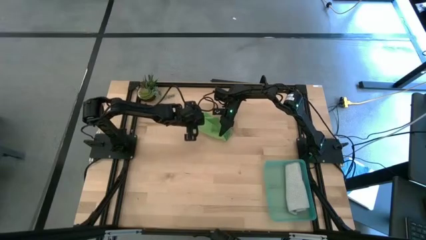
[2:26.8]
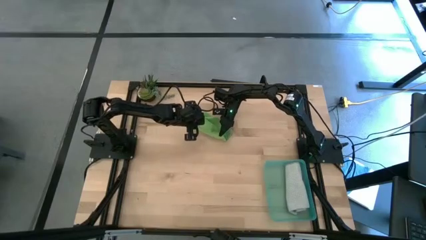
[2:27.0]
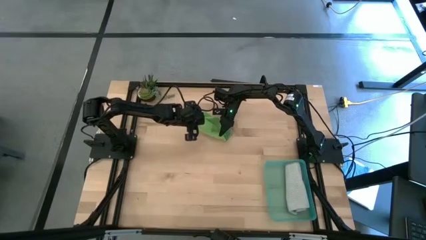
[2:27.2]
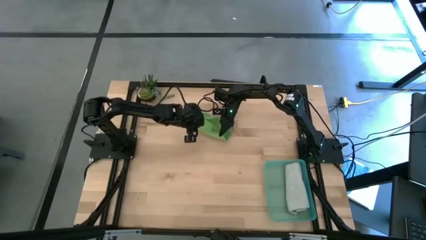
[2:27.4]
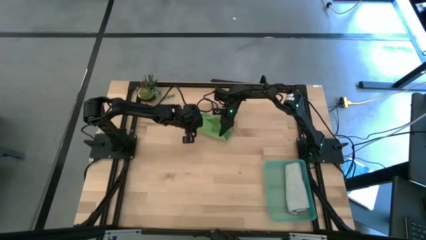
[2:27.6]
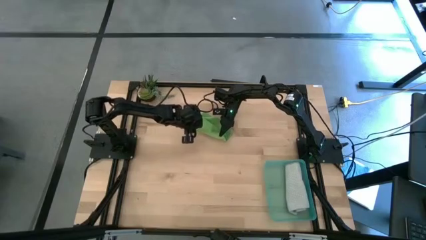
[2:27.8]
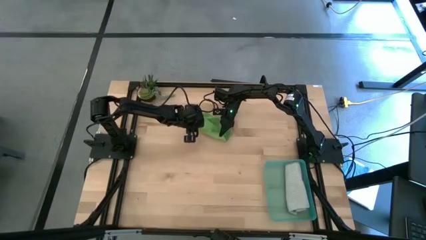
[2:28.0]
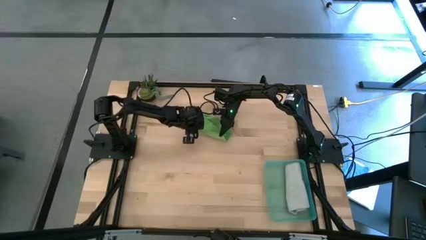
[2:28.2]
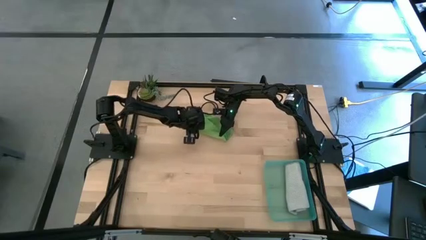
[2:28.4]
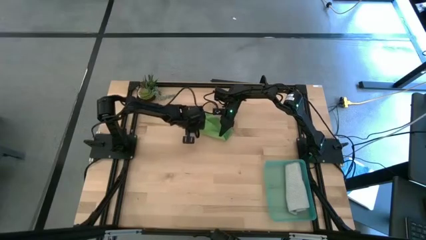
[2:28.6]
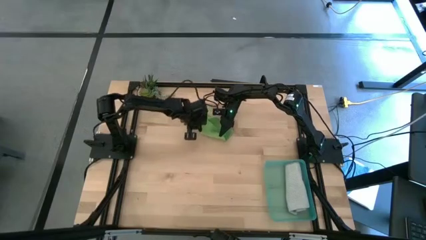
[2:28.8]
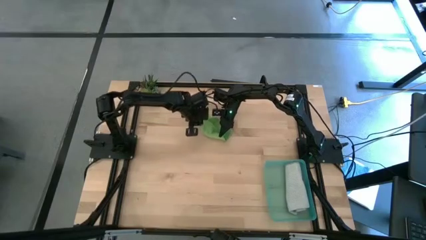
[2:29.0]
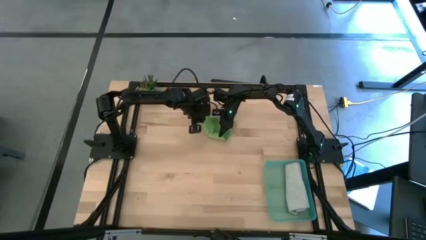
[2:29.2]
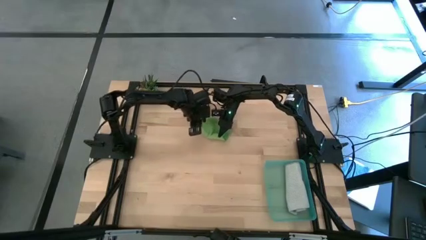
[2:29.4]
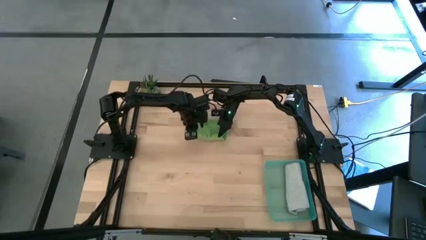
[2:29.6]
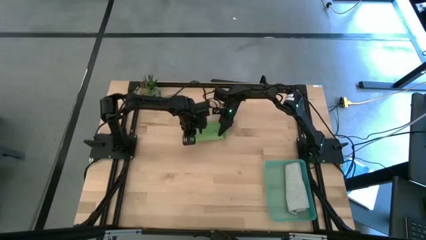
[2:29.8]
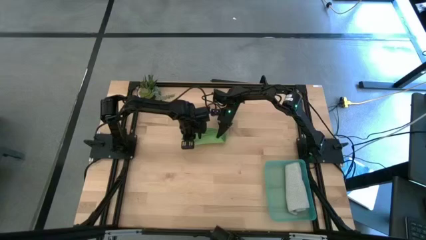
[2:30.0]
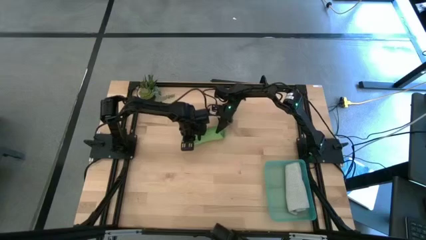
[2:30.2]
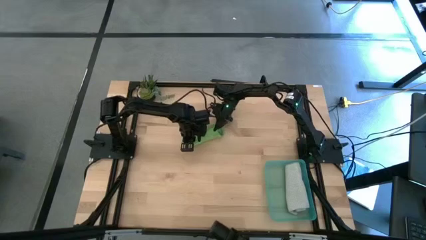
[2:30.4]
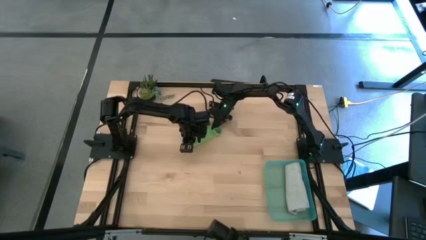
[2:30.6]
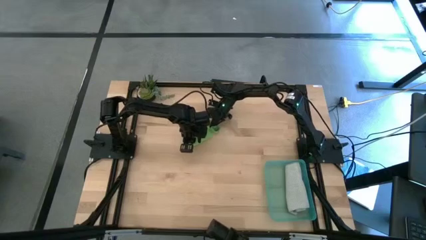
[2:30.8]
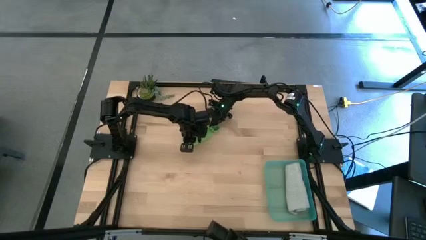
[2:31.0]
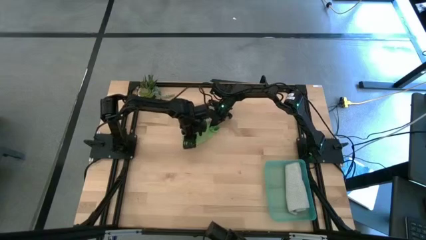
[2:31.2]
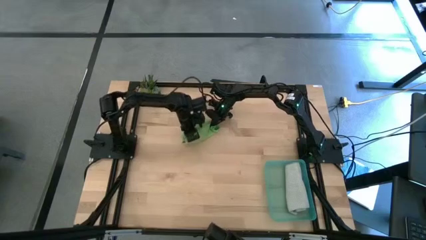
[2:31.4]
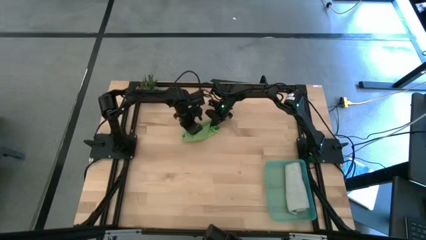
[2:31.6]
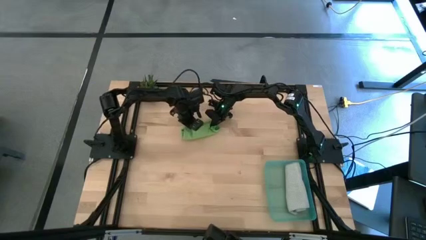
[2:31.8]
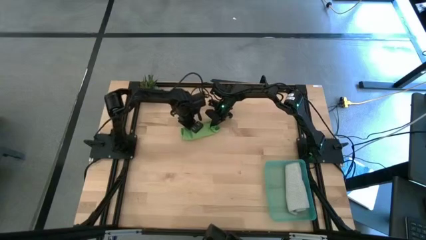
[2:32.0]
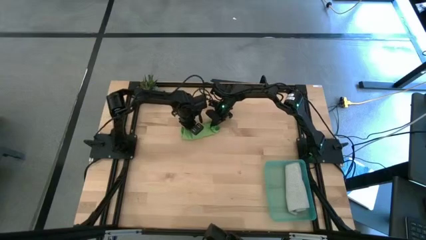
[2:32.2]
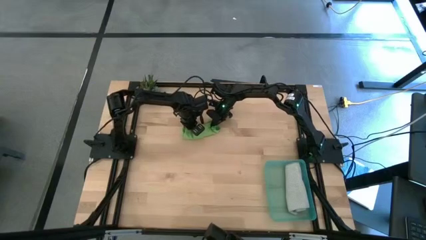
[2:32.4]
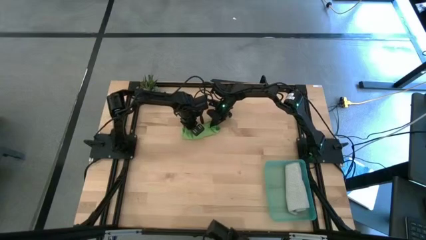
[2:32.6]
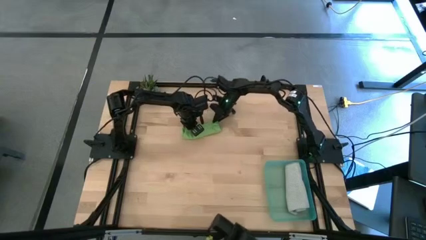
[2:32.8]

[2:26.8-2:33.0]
Task: Roll microfiber towels into tight, uniform cylinder then place into a basket
Roll the green microfiber towel

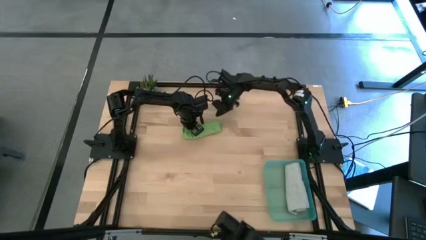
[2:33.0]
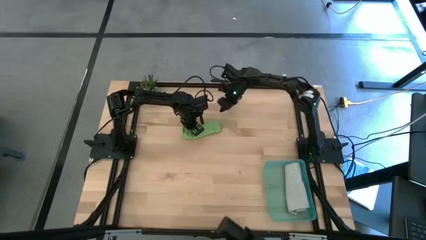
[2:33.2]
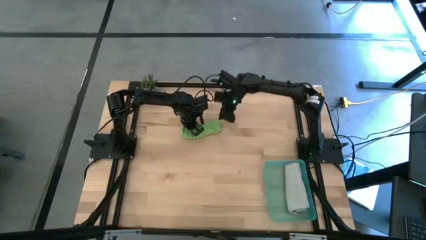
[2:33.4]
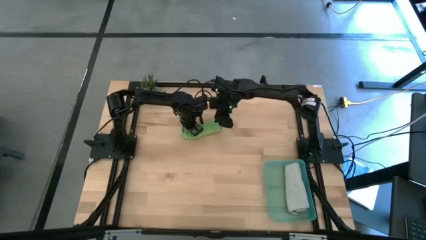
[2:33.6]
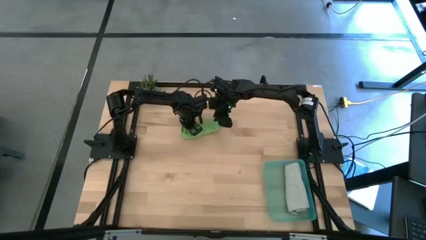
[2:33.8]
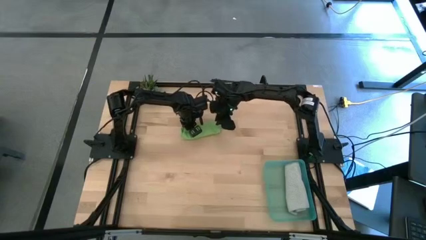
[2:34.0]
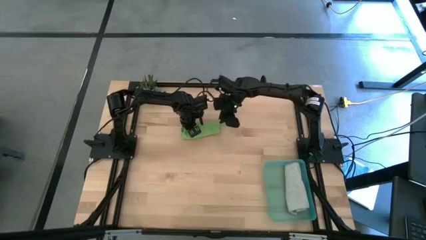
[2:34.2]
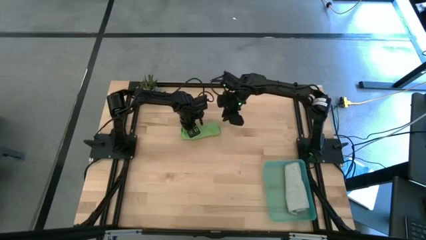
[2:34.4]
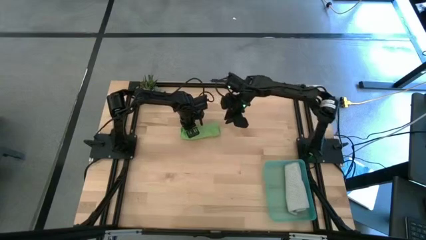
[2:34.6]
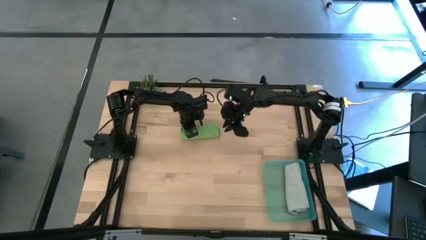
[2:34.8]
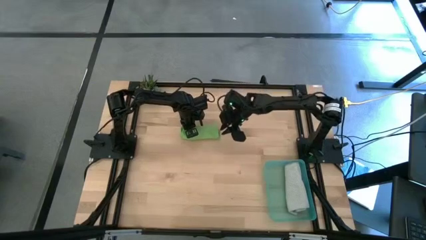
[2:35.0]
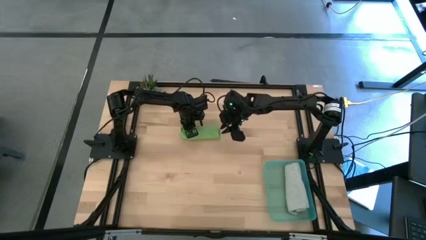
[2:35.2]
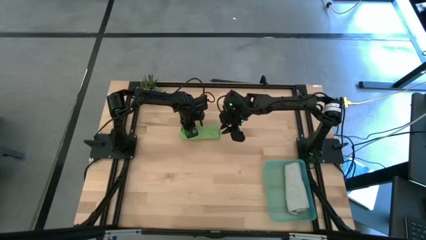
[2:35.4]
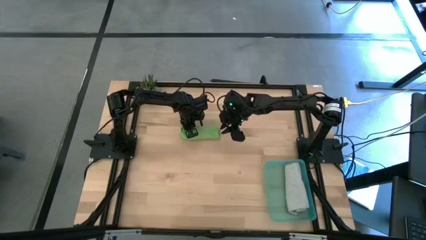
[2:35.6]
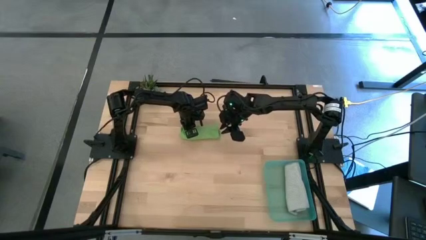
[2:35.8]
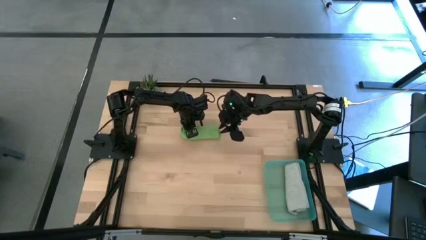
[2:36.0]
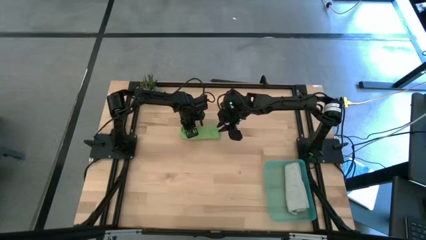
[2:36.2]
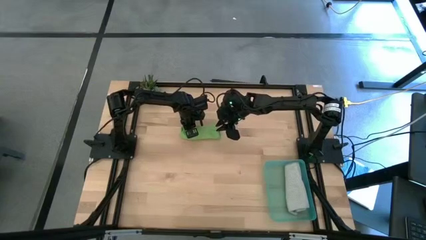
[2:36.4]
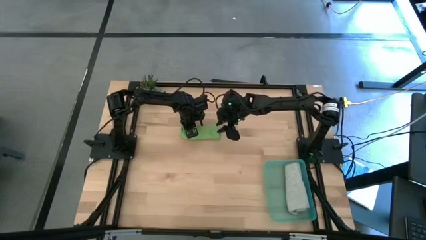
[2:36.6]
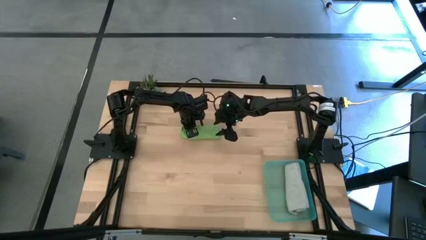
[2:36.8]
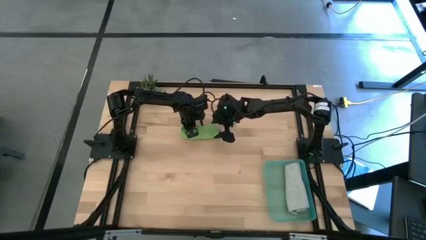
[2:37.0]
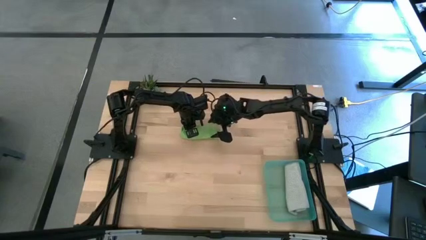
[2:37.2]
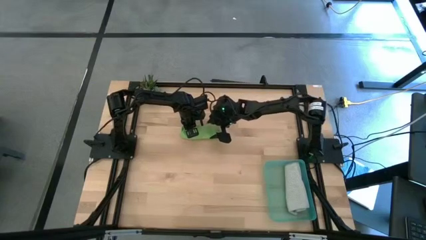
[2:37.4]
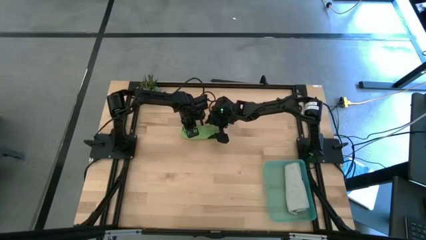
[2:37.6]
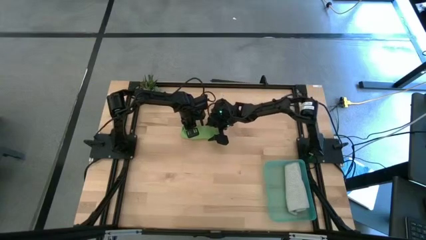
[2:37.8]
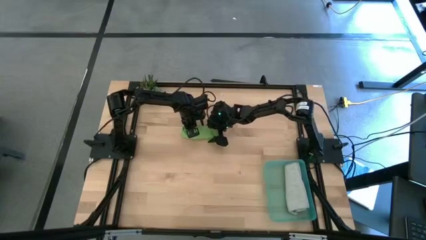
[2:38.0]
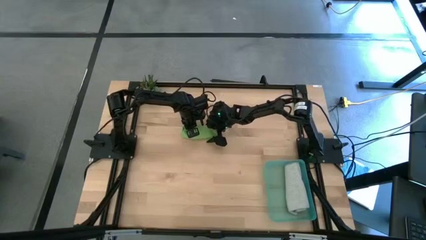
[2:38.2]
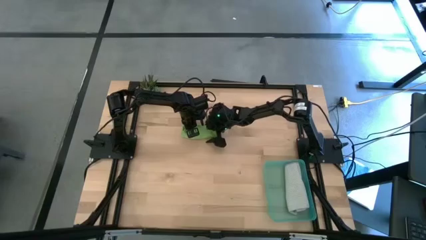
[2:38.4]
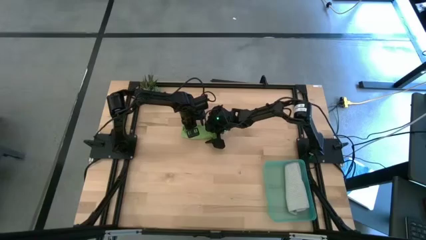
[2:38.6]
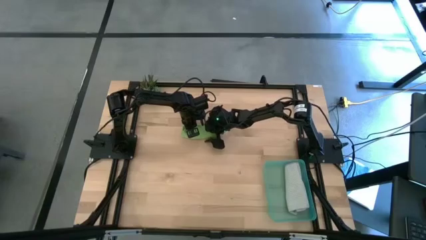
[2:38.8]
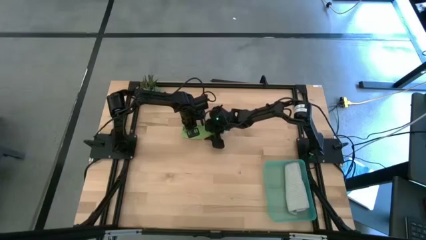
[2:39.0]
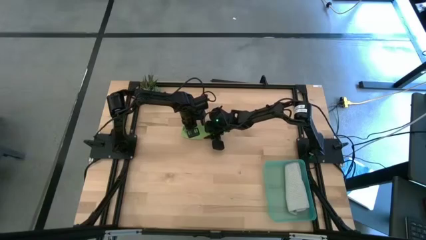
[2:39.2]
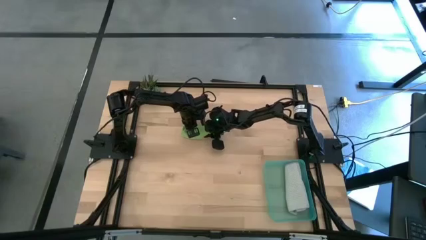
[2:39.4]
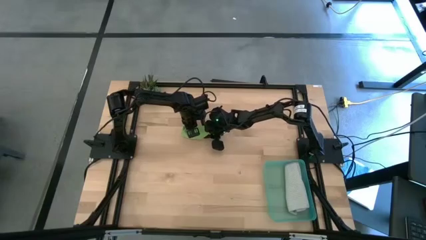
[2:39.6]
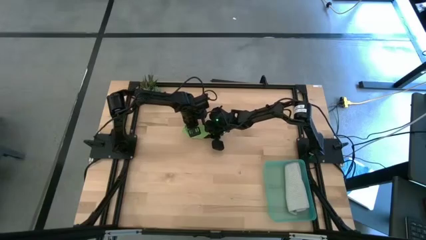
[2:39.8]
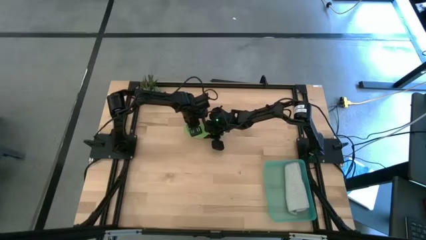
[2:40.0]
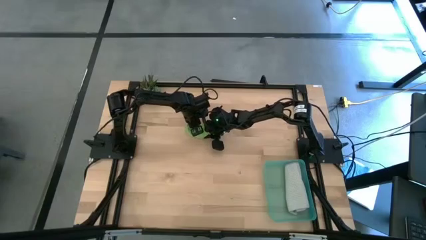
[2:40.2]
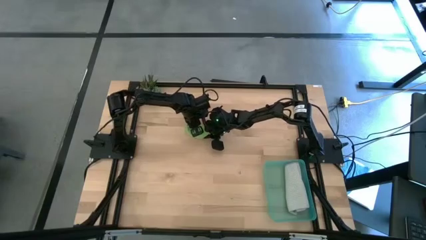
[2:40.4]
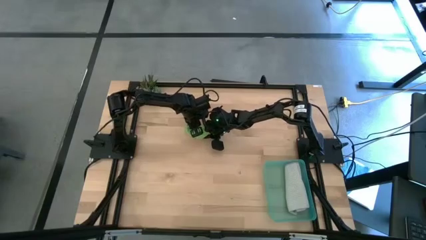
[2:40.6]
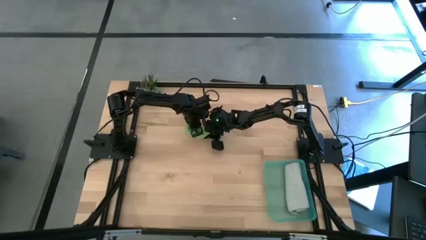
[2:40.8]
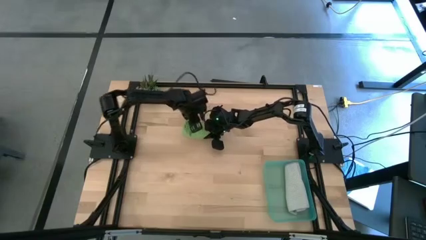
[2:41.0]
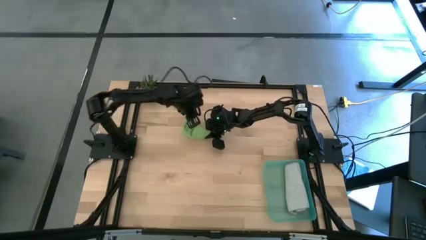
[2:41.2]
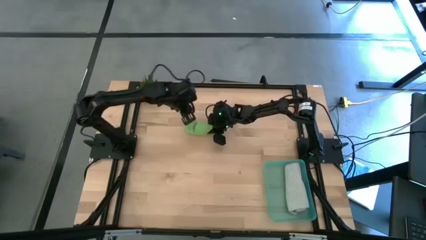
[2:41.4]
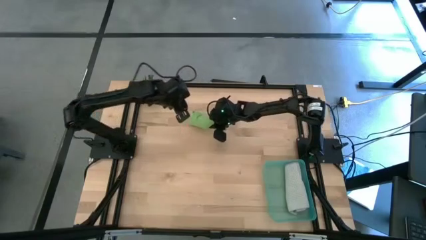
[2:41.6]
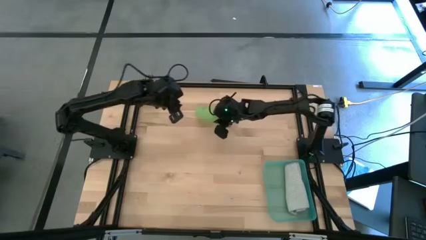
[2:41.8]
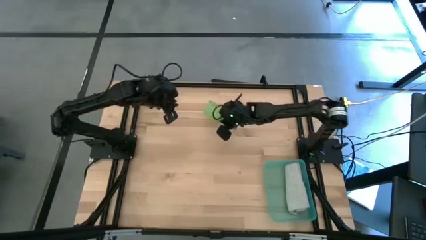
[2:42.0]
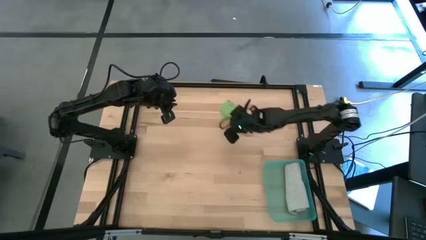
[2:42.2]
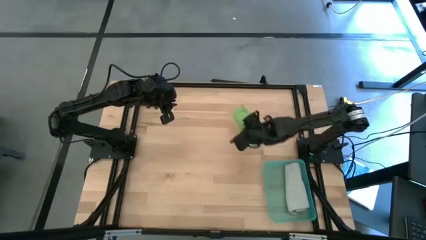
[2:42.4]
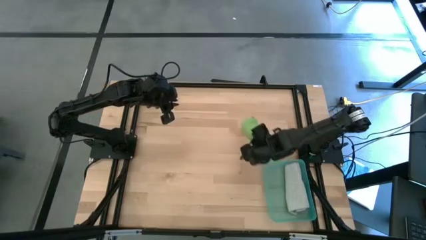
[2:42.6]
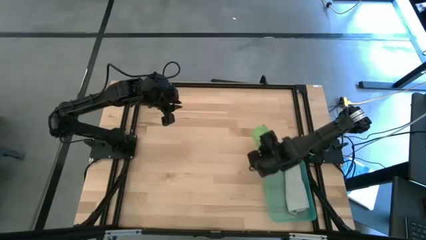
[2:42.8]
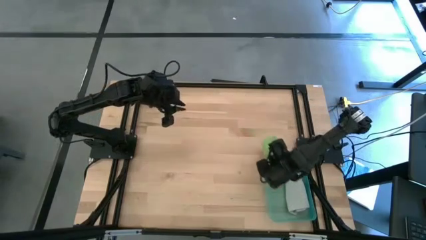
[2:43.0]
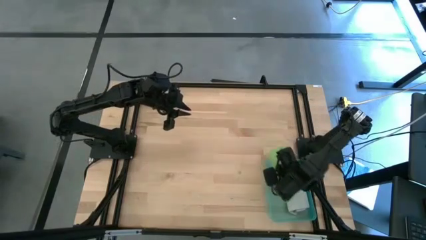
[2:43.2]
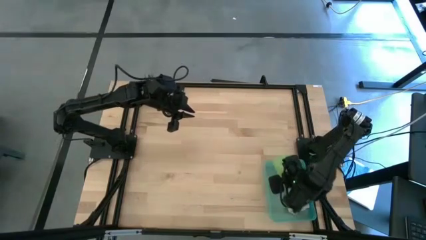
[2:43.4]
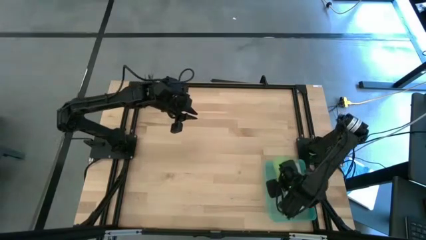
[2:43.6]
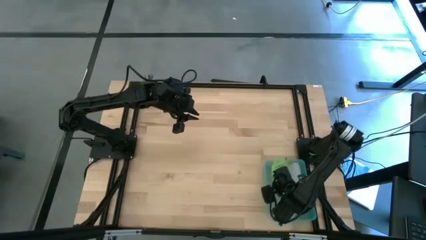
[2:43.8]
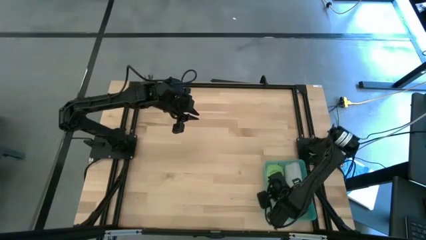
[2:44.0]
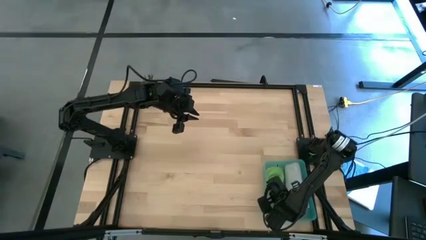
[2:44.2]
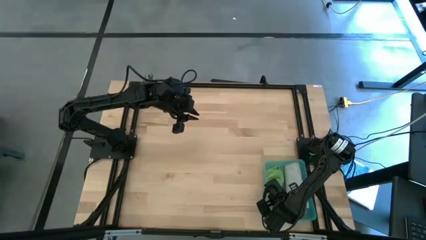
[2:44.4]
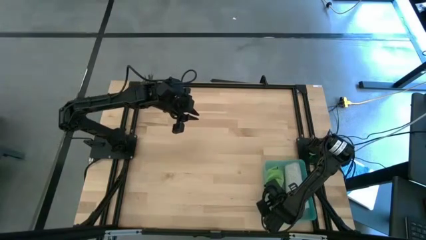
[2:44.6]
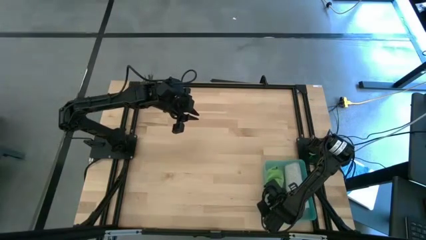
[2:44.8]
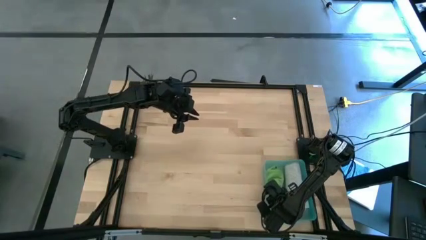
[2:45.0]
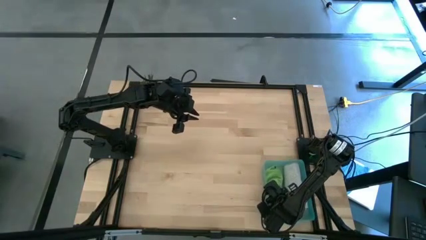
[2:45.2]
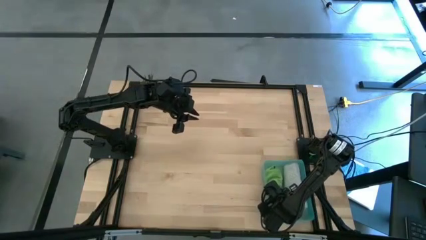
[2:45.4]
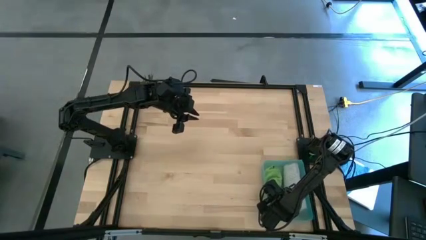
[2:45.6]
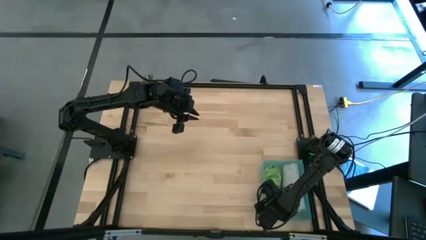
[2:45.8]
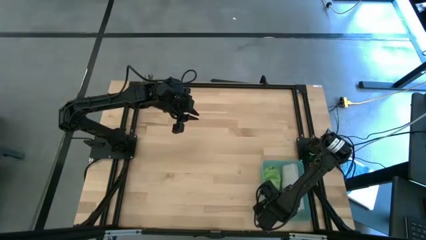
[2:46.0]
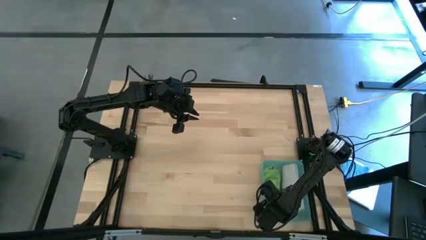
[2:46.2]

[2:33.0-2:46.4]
Put the green microfiber towel into the green bin
